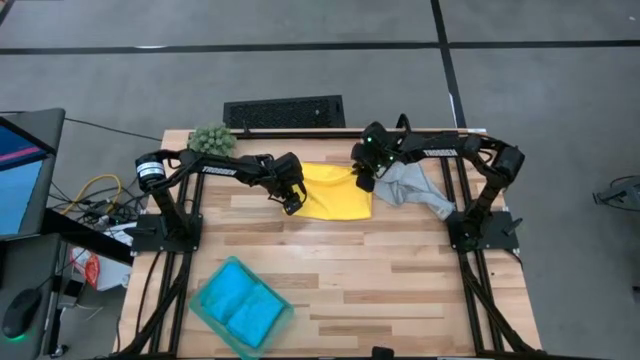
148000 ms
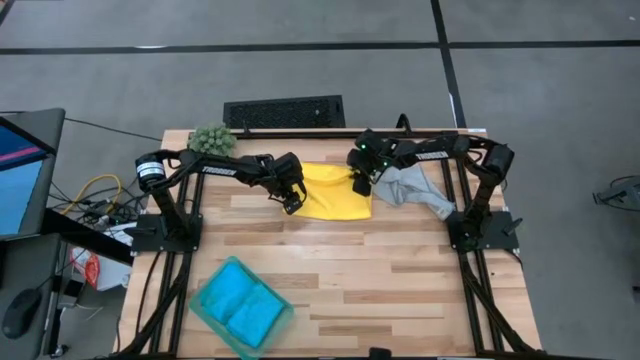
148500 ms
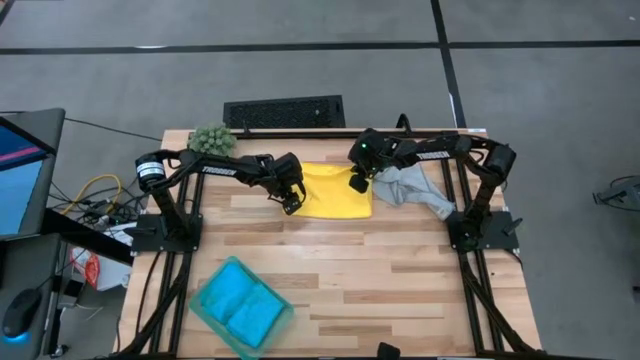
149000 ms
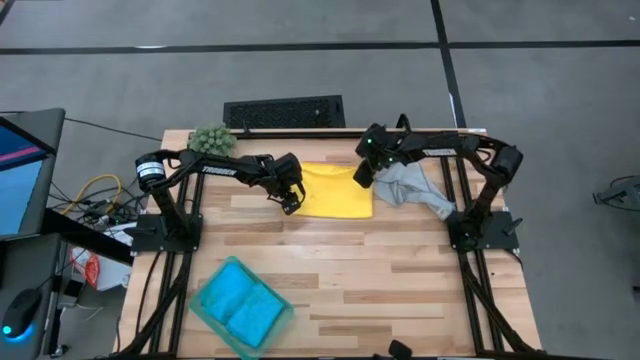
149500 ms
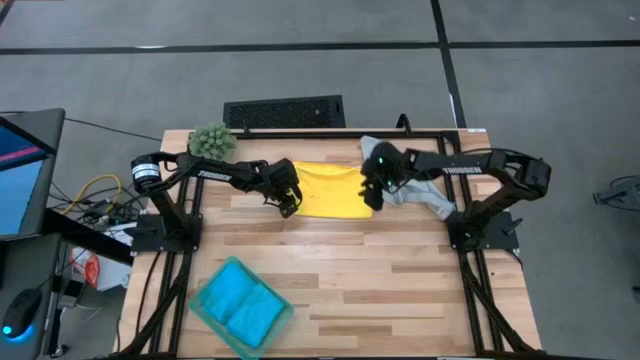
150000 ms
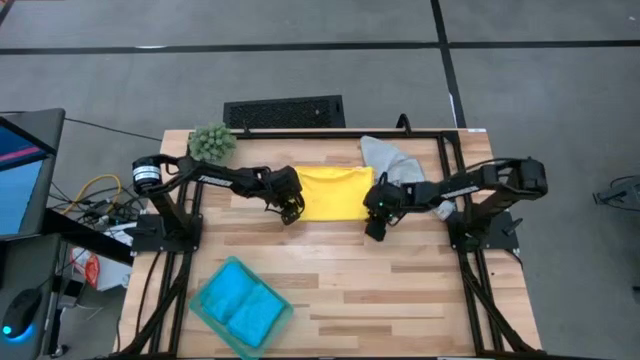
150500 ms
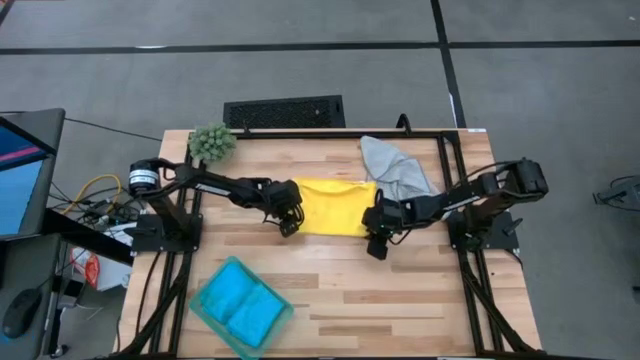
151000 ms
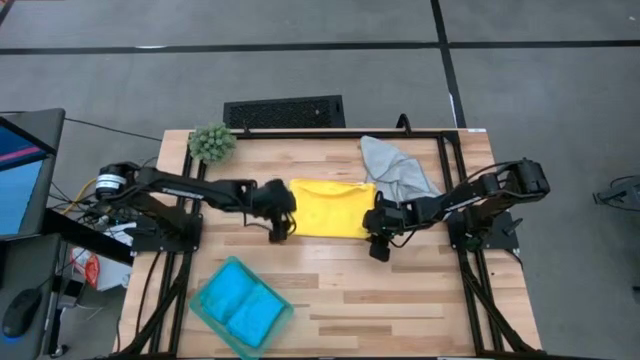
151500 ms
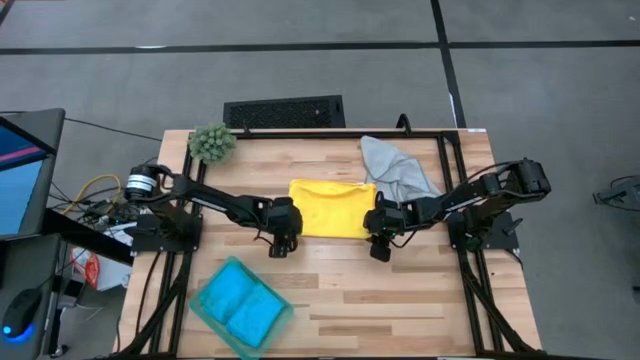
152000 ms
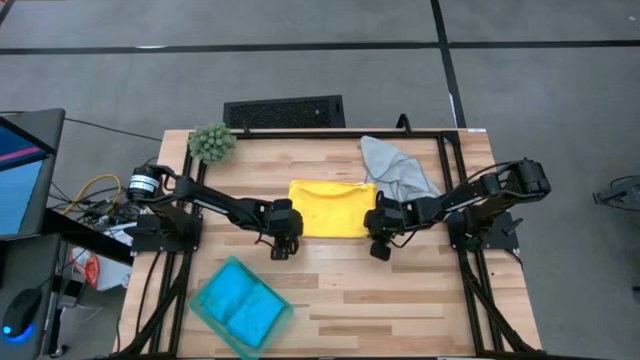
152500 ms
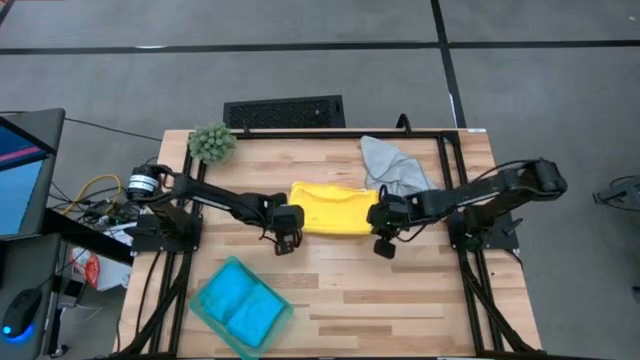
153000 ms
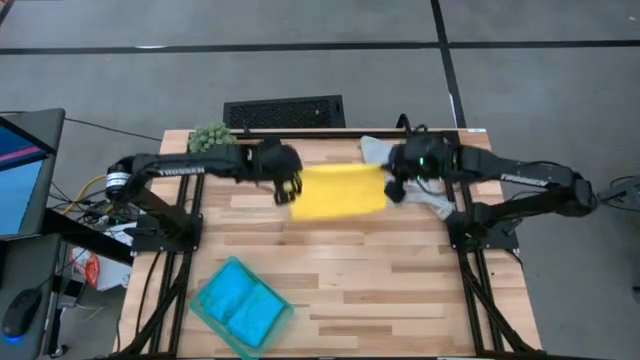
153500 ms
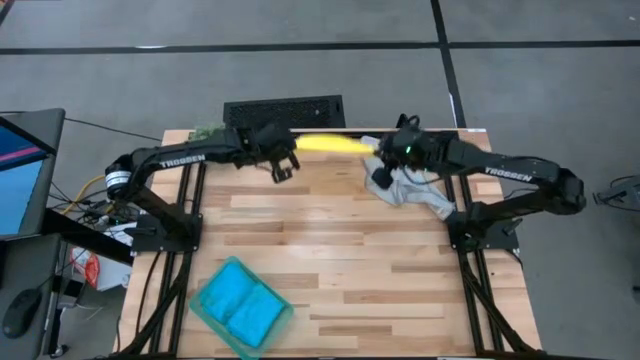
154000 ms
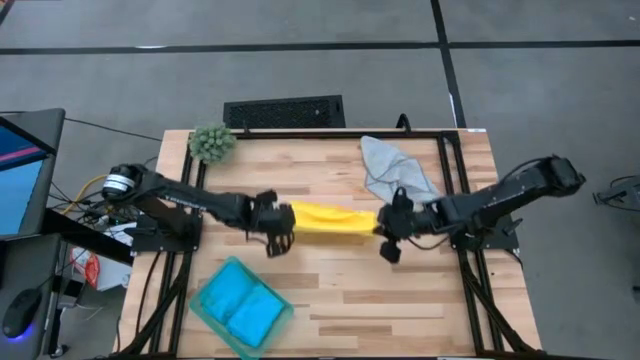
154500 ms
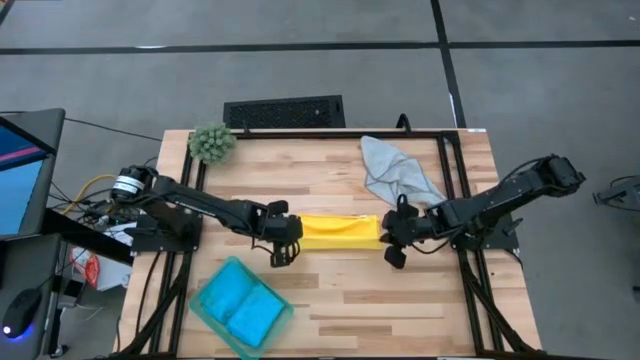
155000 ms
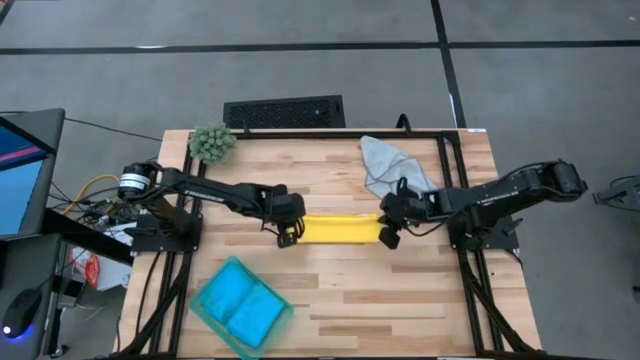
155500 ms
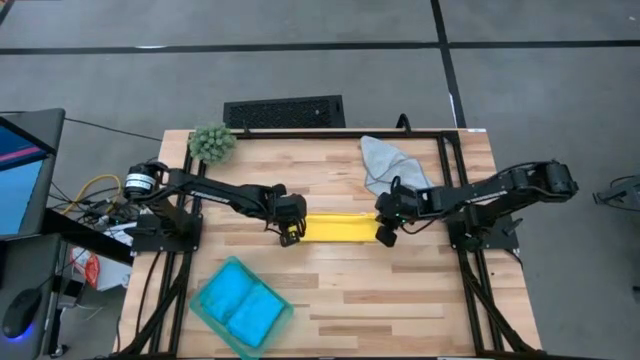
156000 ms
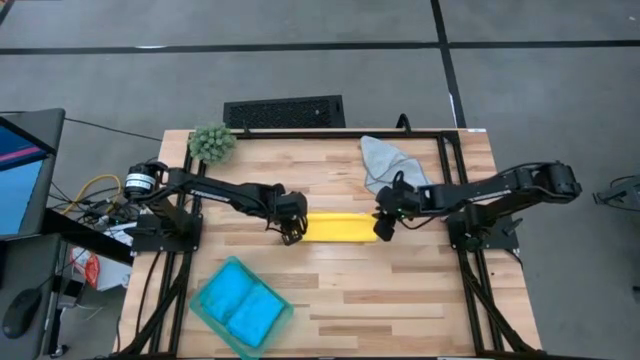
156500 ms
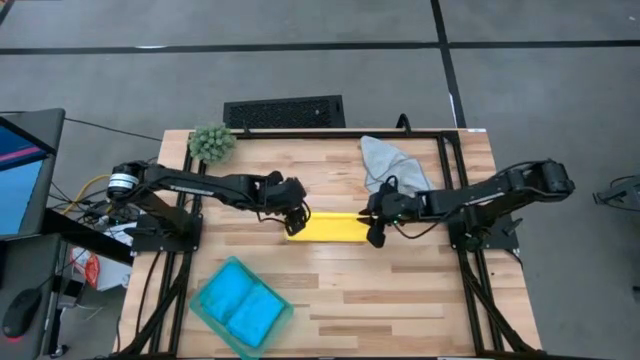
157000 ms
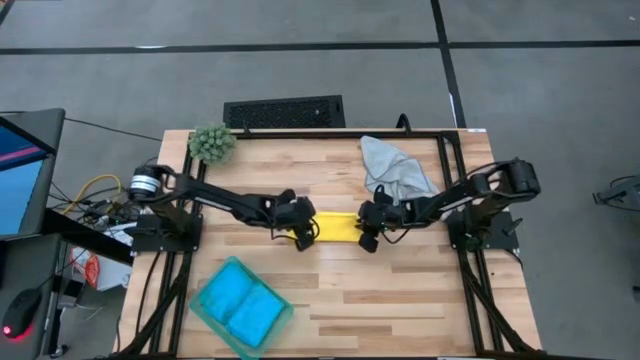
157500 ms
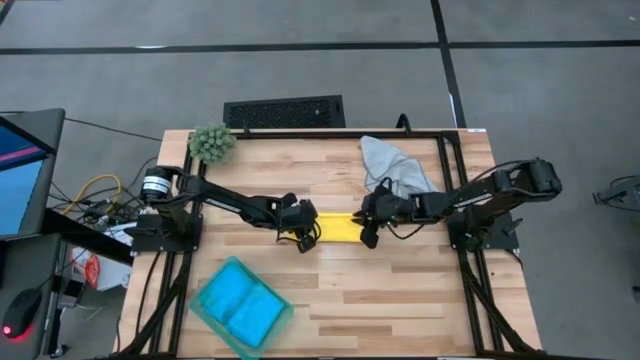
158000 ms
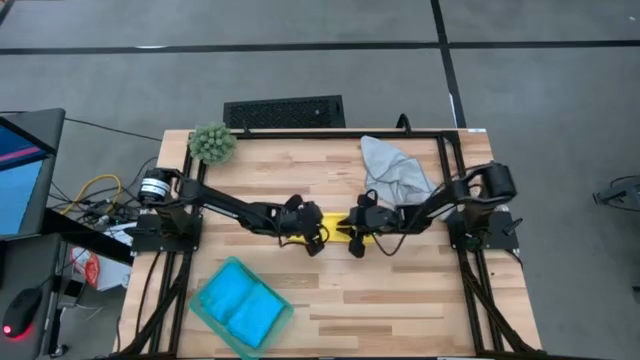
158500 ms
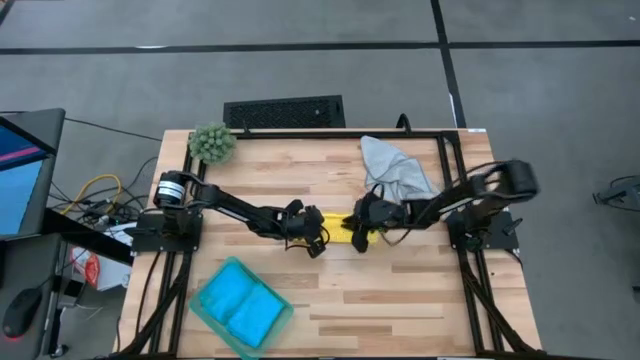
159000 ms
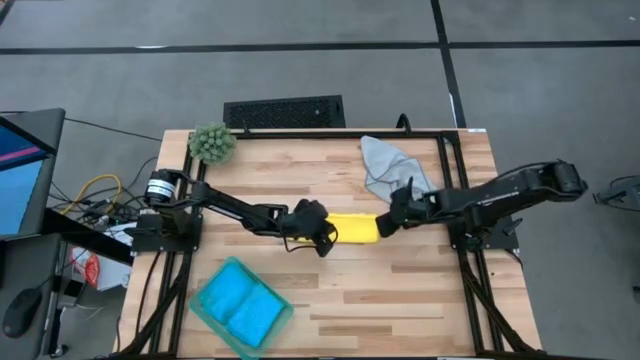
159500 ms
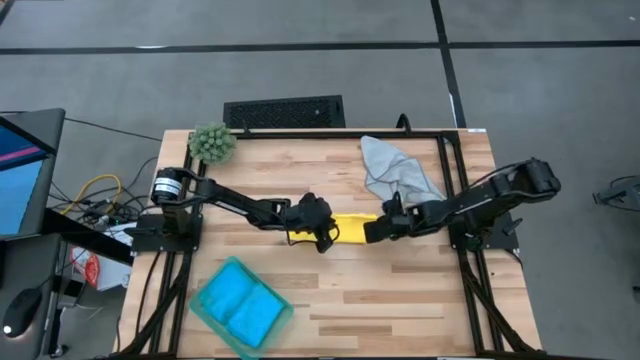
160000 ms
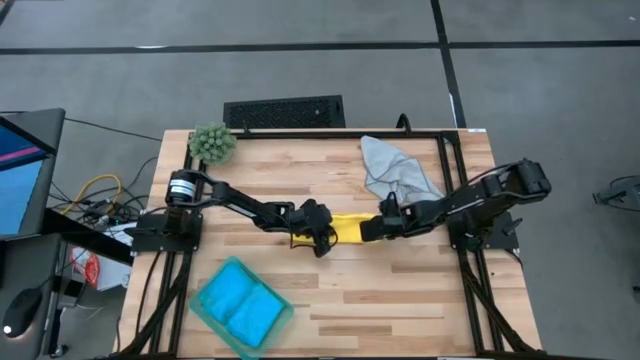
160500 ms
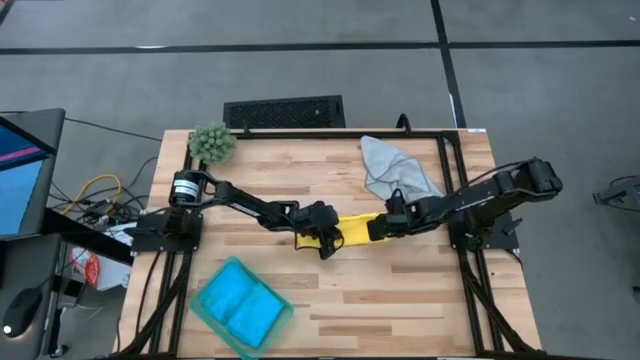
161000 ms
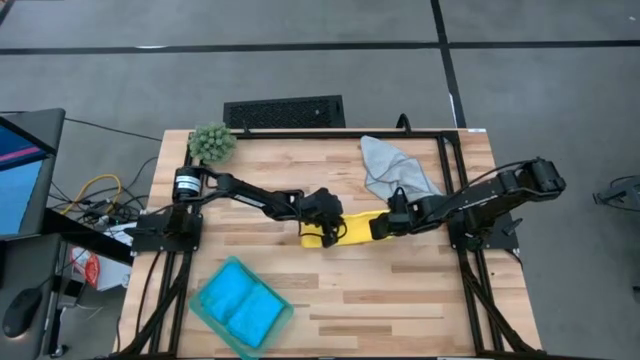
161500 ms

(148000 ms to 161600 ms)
Task: Fold microfiber towels
Fold the yellow towel

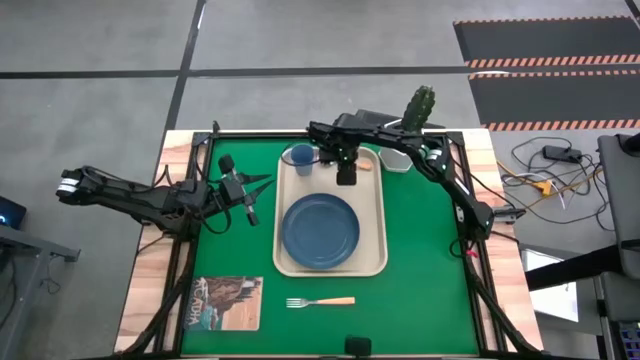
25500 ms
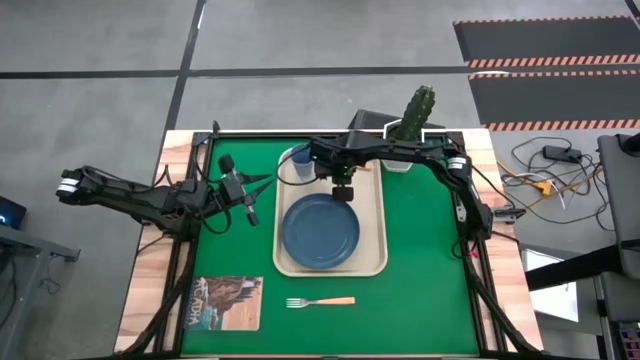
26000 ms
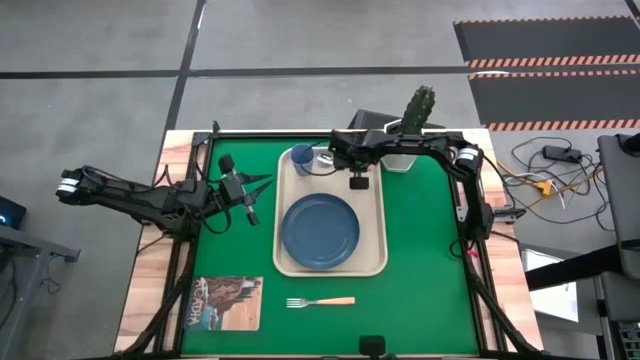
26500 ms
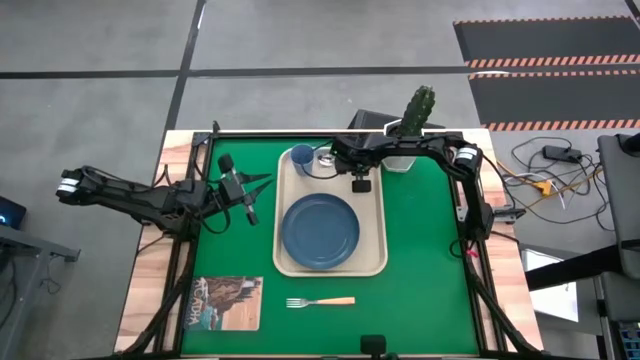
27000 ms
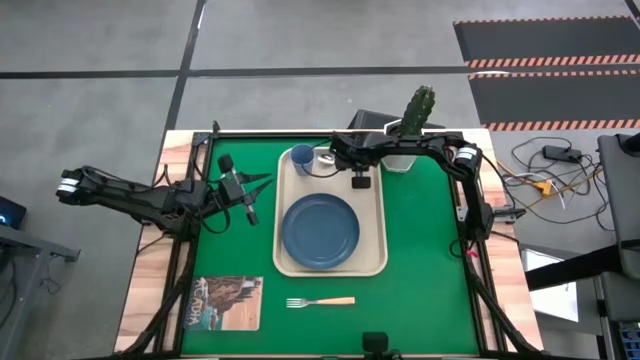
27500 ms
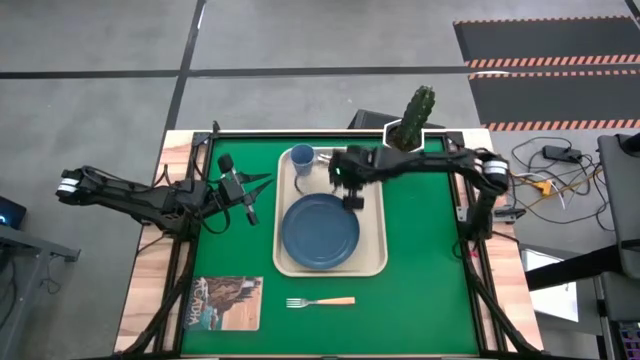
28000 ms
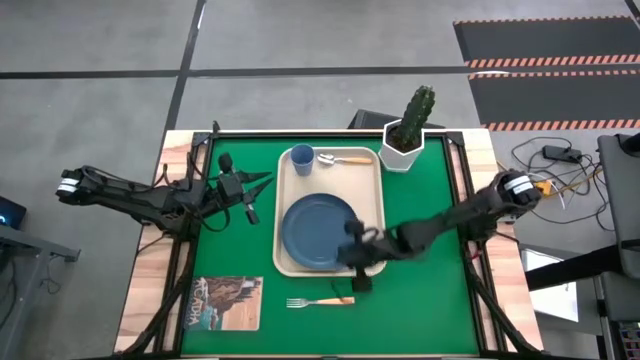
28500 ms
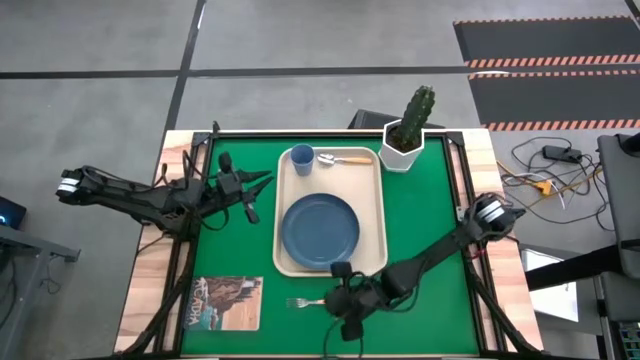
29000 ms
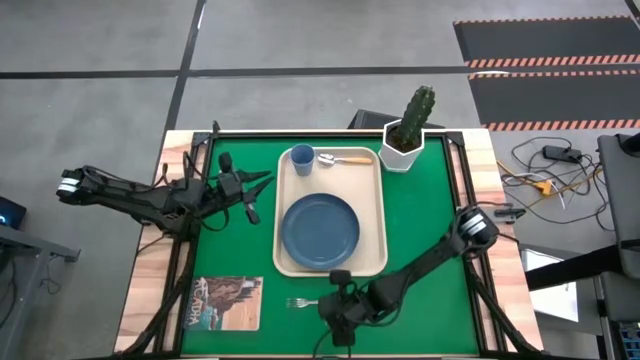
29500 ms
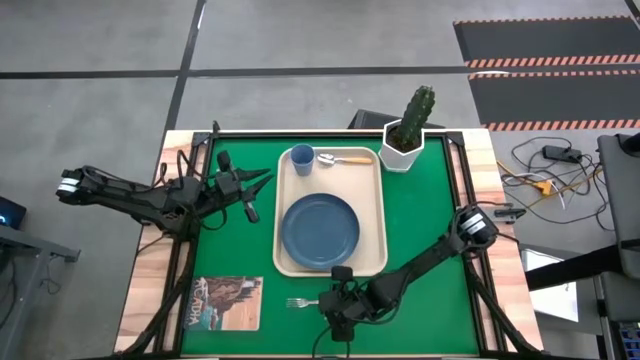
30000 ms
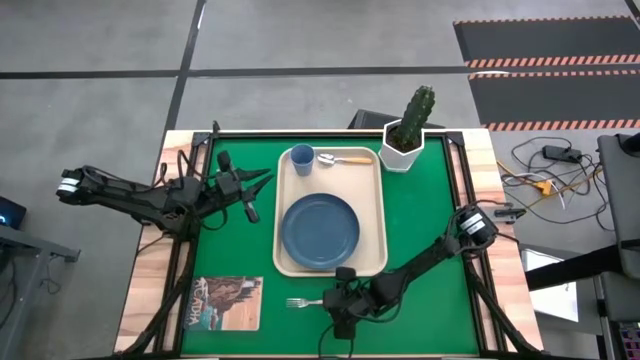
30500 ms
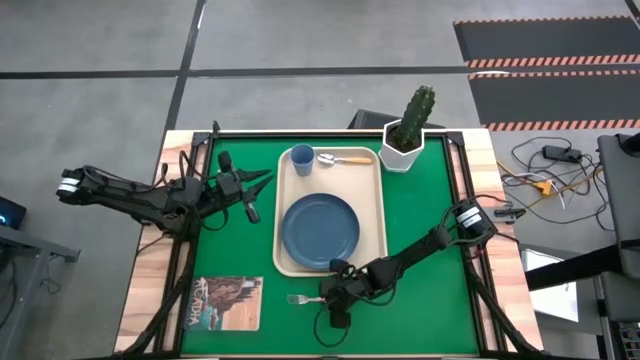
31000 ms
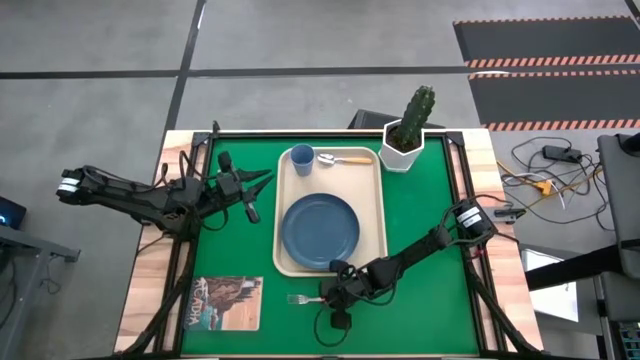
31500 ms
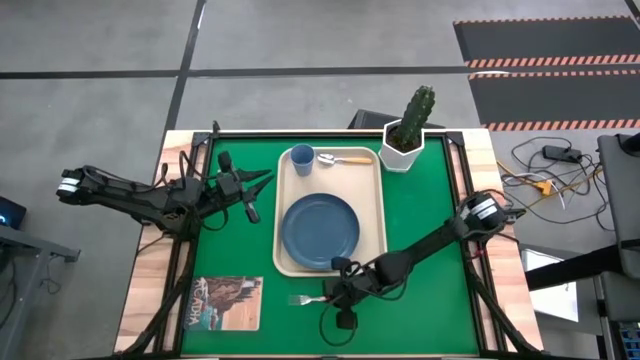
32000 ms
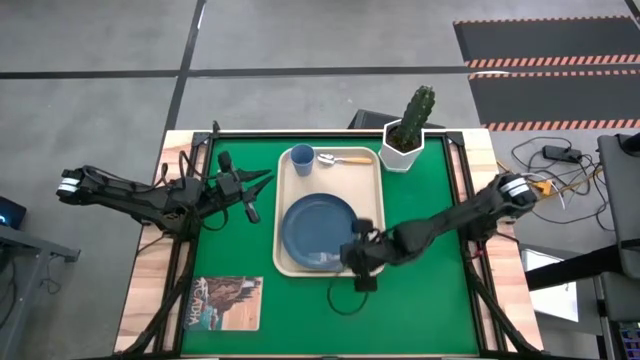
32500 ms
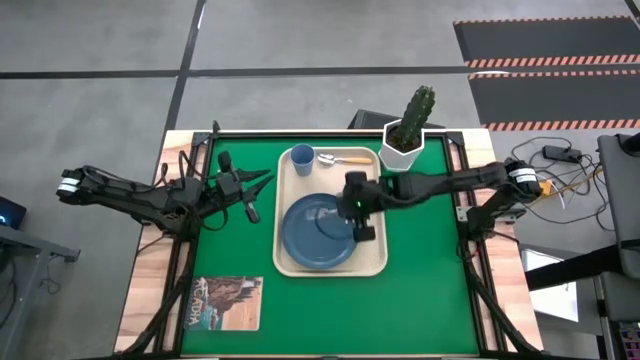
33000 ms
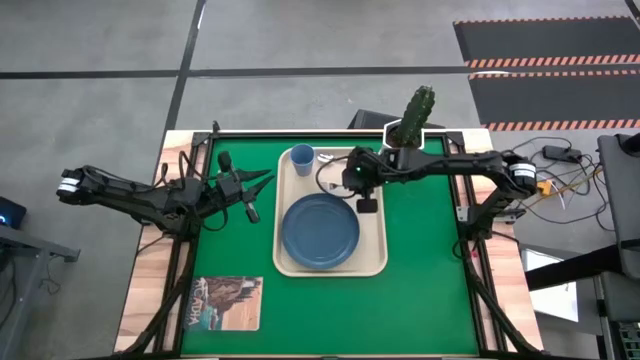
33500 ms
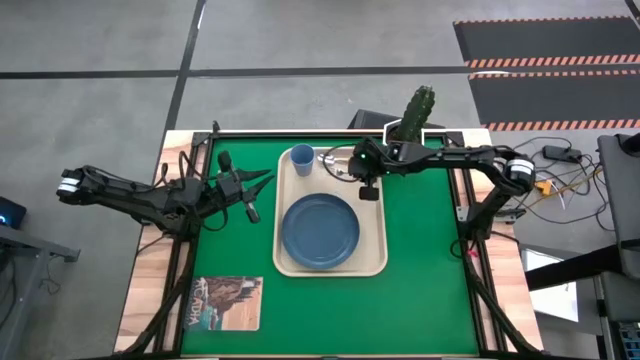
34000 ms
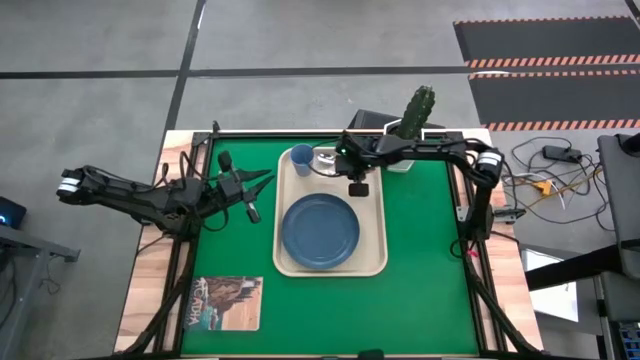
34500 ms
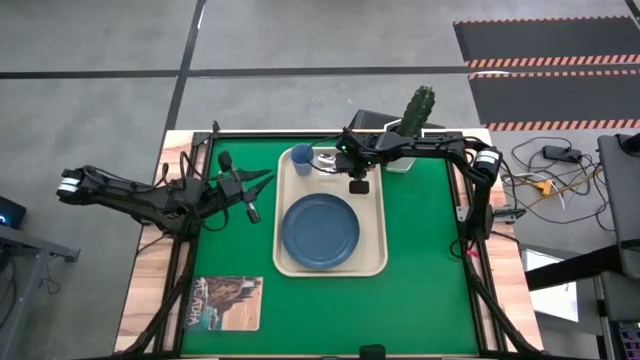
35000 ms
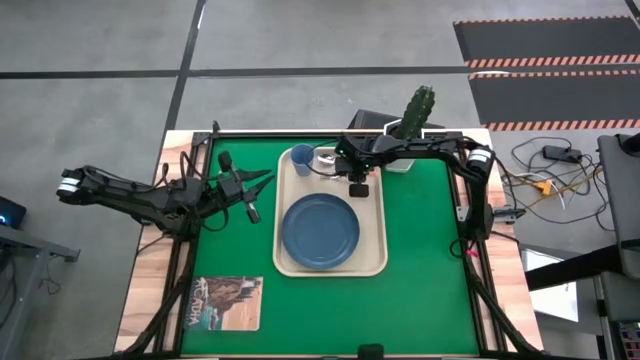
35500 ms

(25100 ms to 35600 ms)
Task: Pick and place plate/cup/fork/spoon on tray
Put the orange fork on top of the tray
